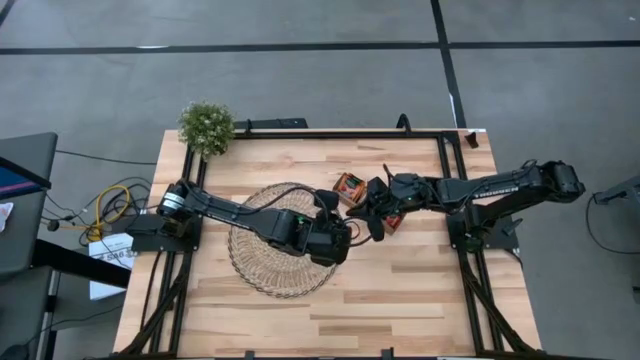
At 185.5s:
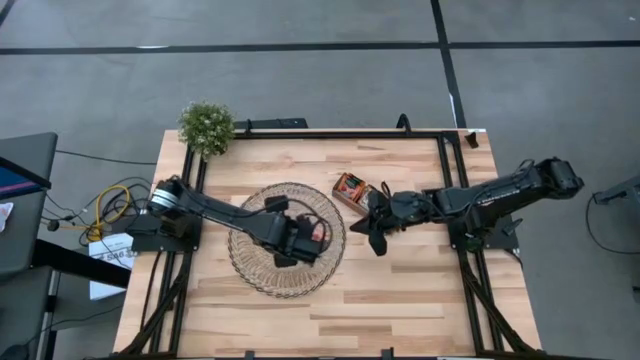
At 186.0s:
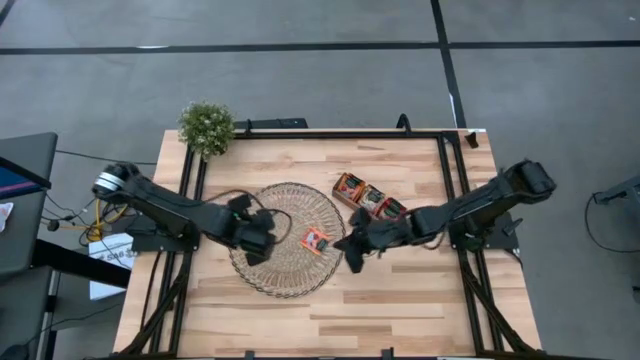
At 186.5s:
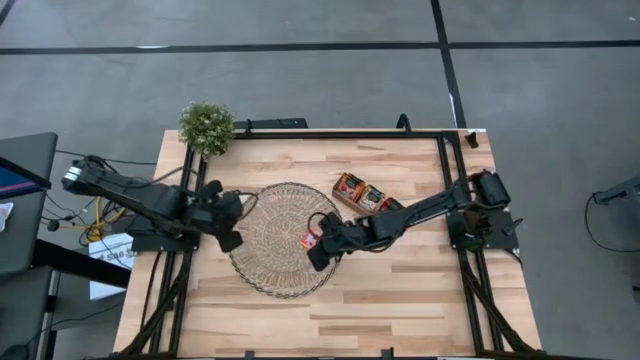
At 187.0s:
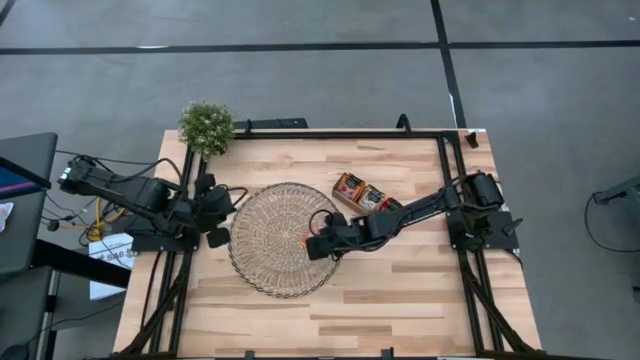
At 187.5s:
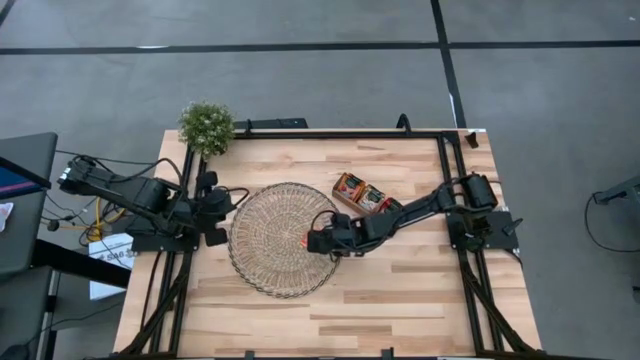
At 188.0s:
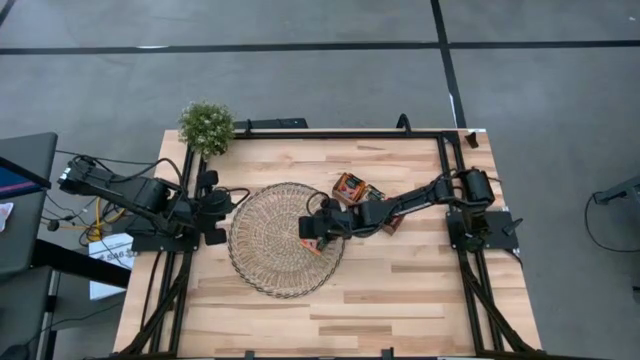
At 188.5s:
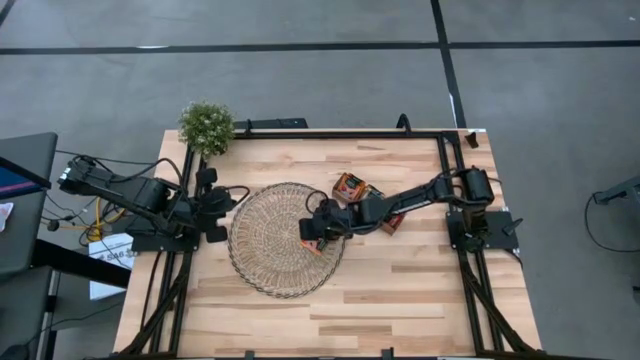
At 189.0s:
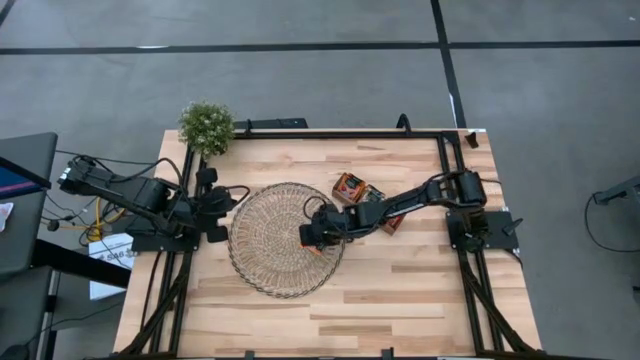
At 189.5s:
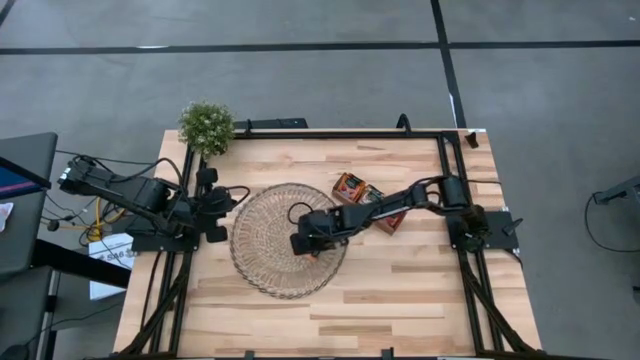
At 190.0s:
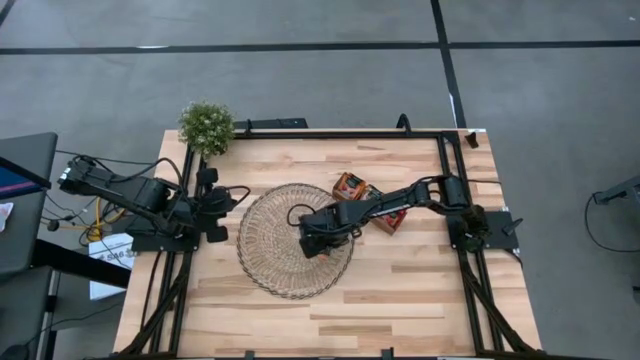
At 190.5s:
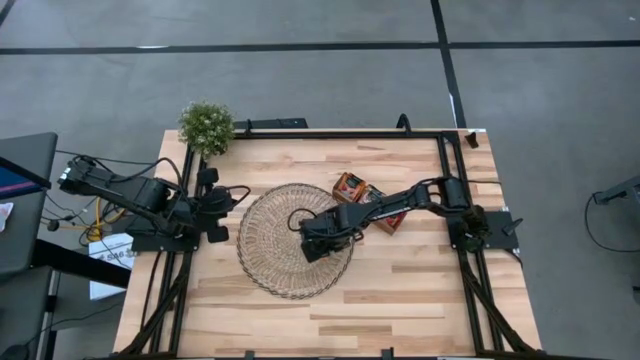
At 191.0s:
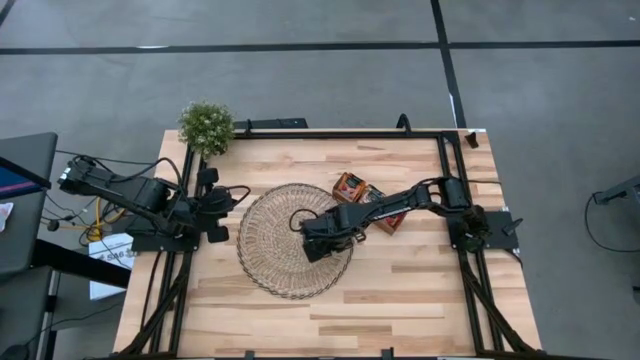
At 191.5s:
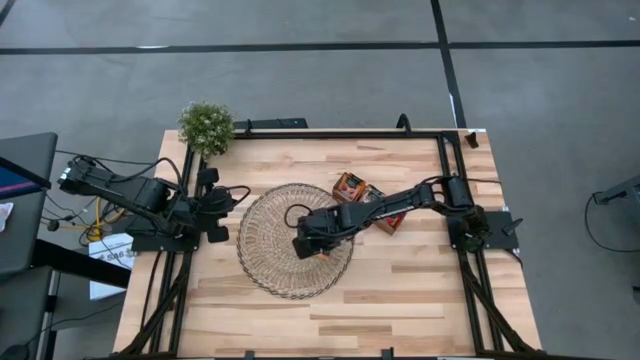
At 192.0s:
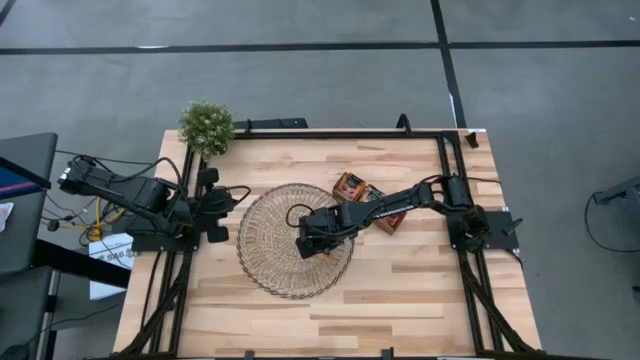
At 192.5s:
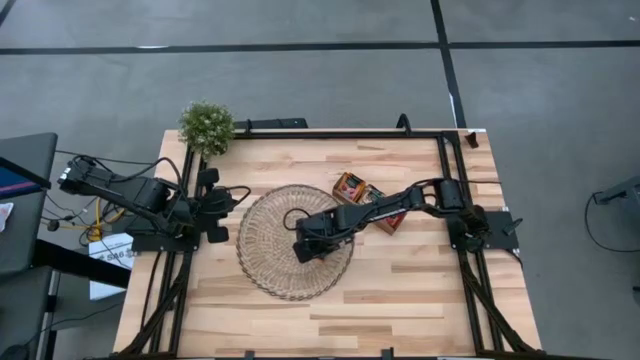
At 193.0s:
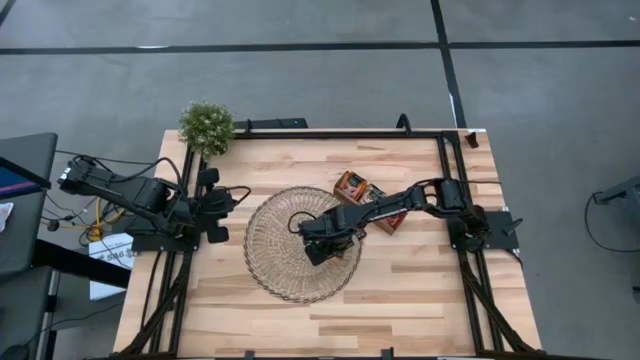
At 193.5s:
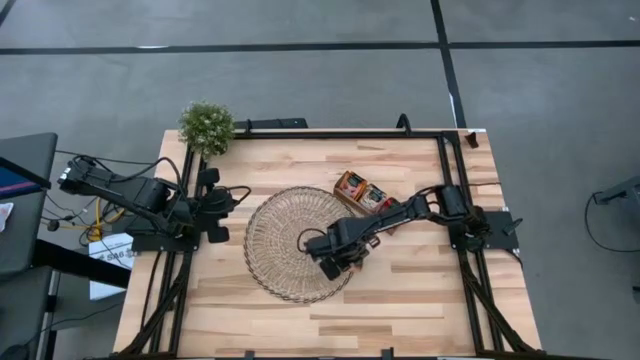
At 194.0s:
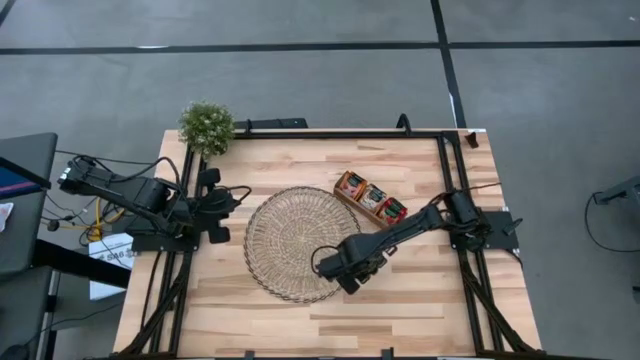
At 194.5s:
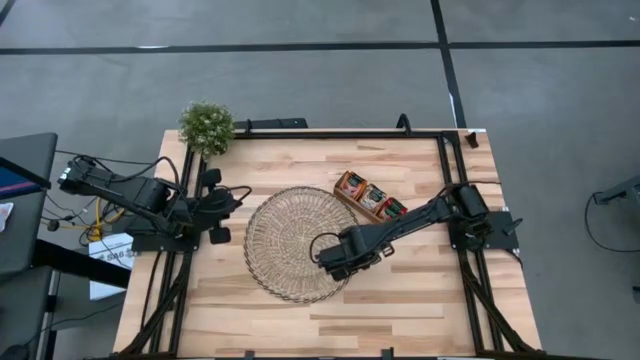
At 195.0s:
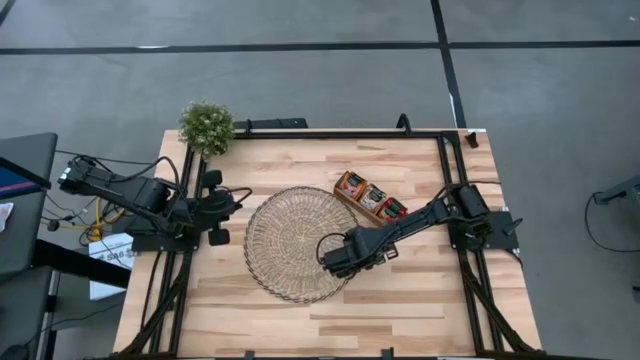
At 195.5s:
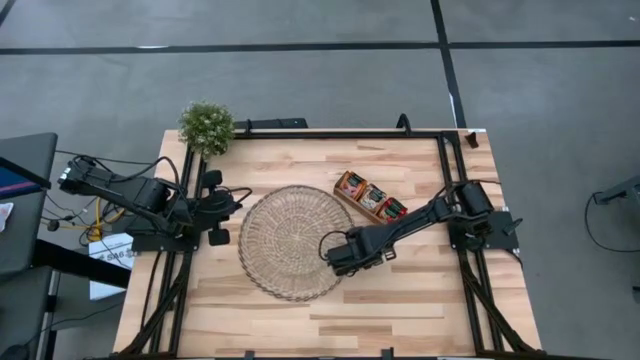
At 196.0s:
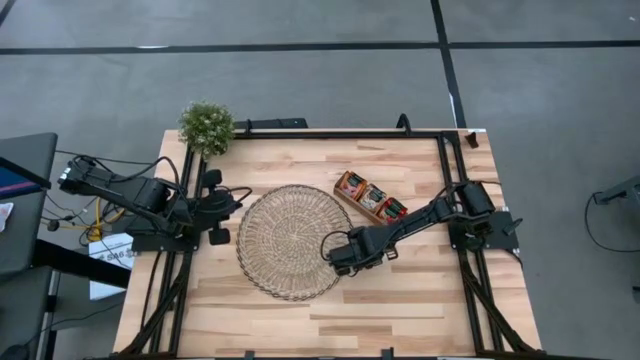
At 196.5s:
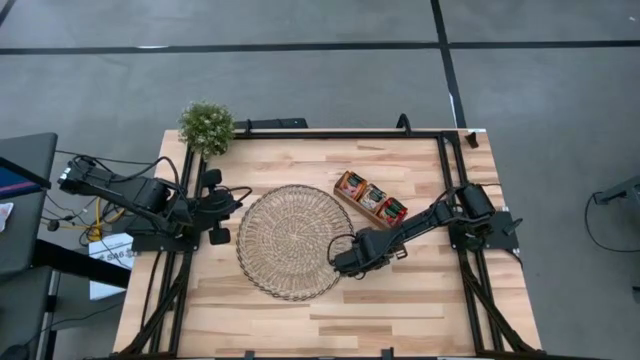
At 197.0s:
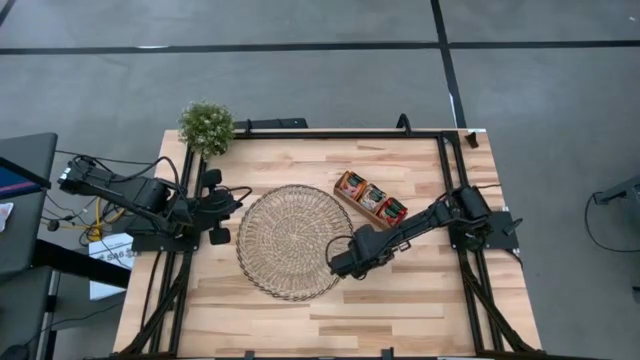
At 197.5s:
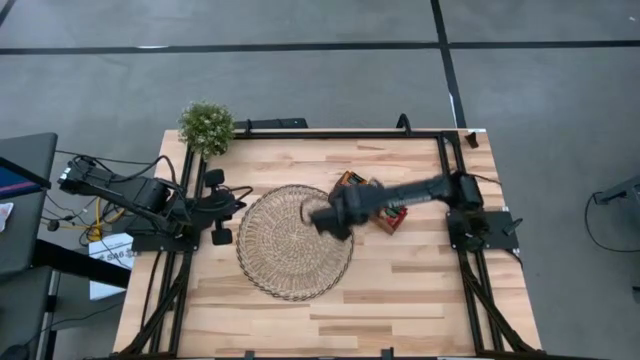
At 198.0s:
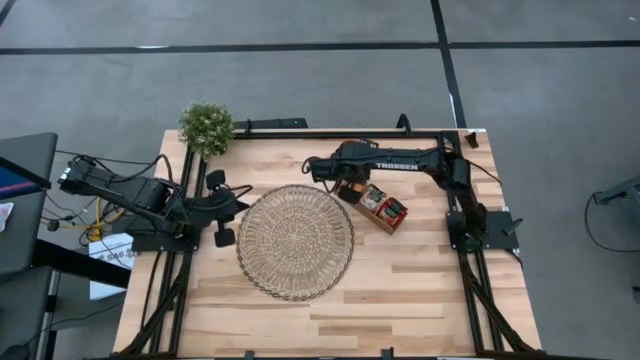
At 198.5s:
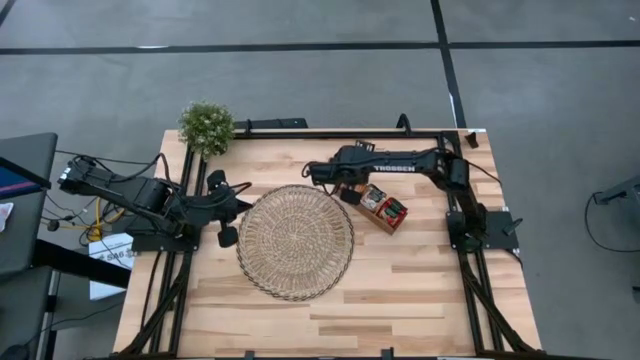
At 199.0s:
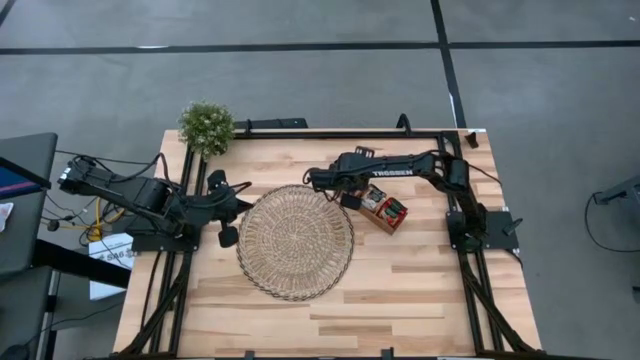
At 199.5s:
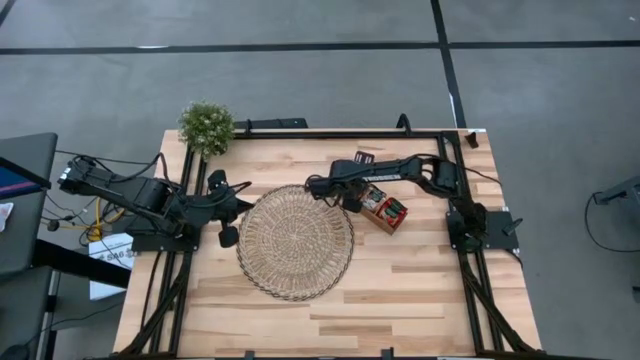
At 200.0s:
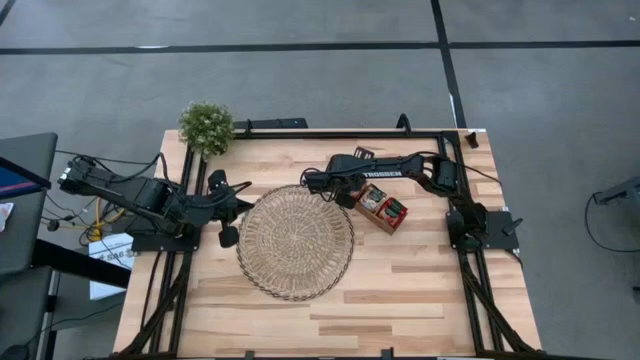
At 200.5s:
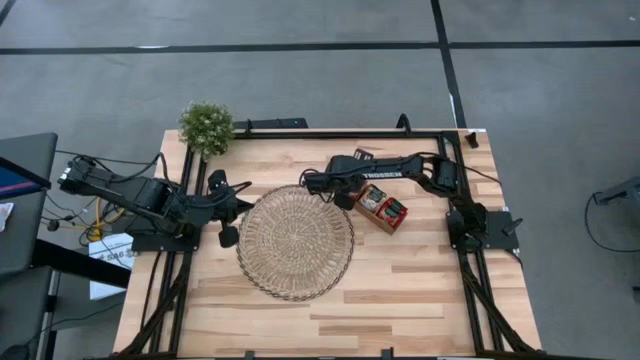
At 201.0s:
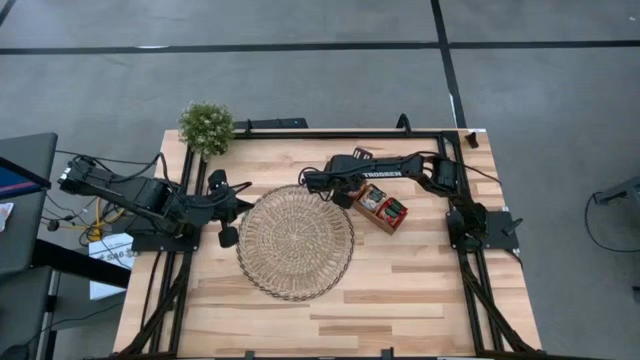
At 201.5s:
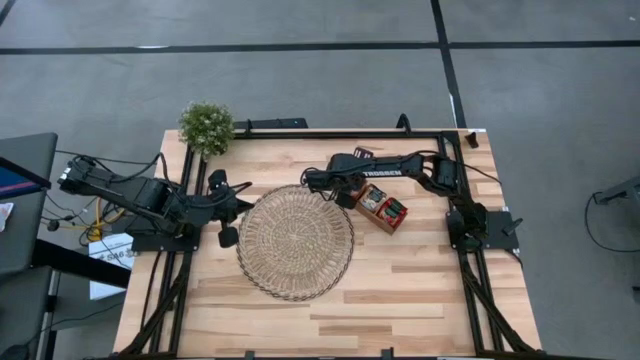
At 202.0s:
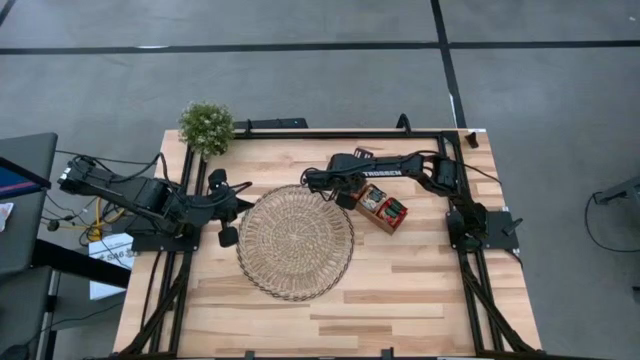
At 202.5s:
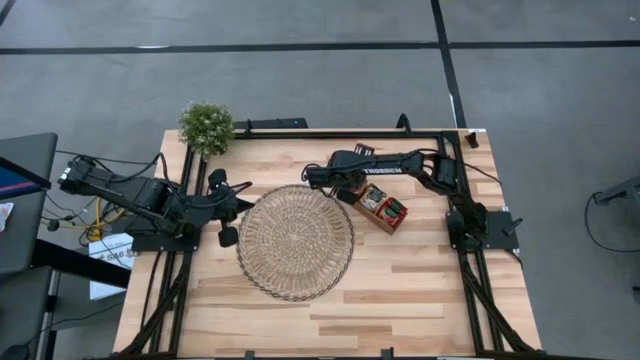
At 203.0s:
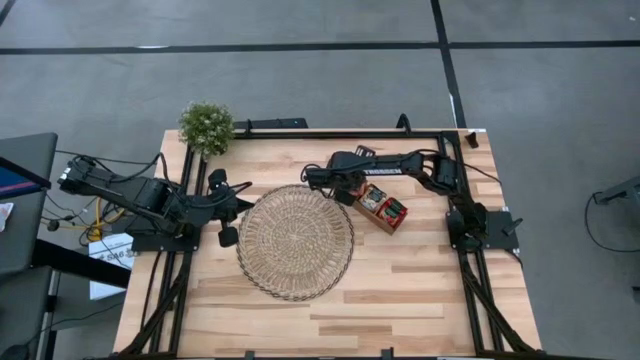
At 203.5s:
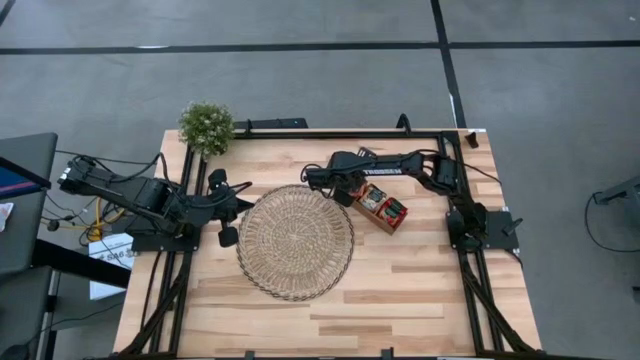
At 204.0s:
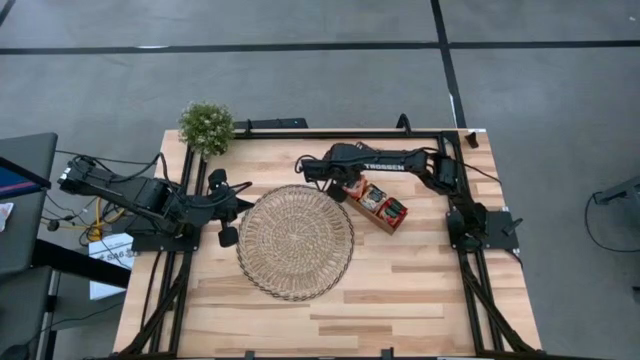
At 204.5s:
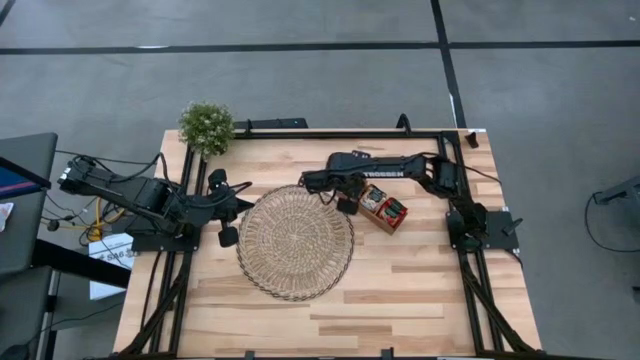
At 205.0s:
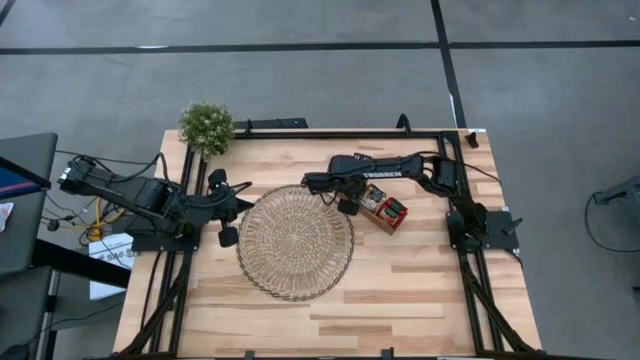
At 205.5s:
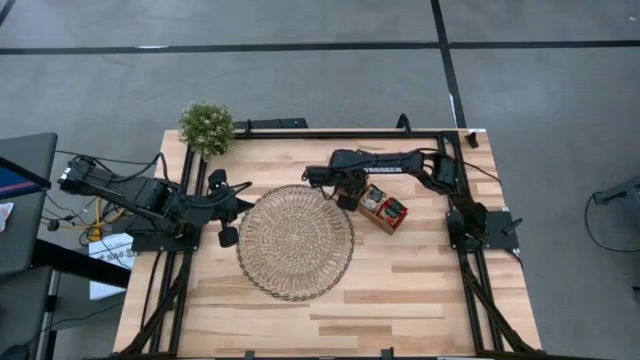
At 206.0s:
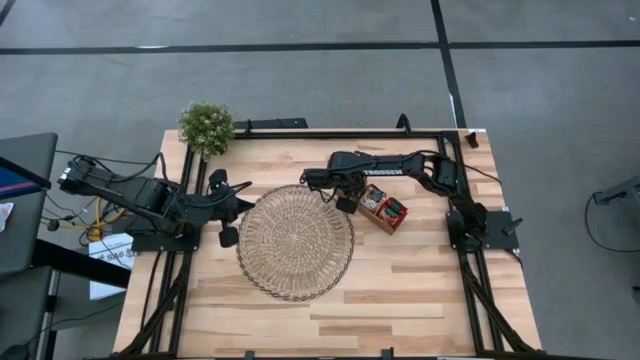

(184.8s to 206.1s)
Task: Pick & Place Tea
Put the orange tea bag into the left section of the wooden organizer
